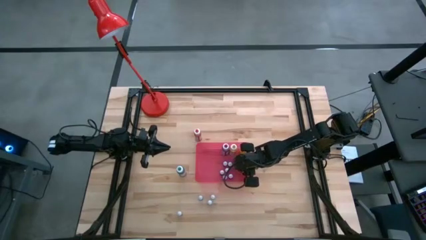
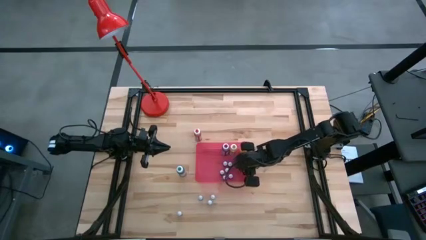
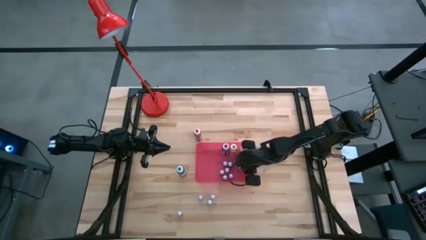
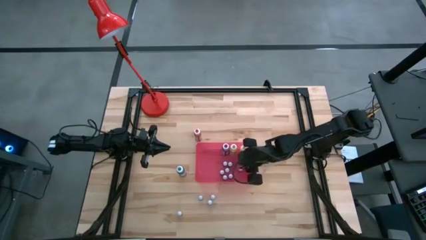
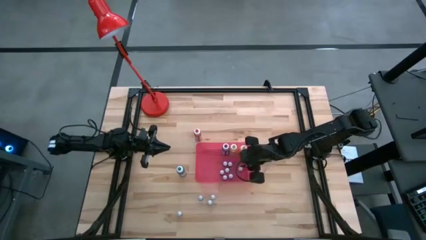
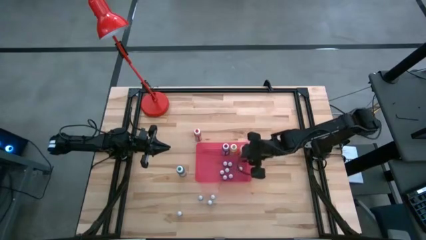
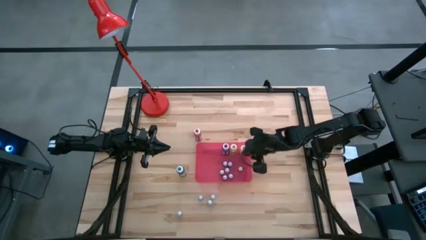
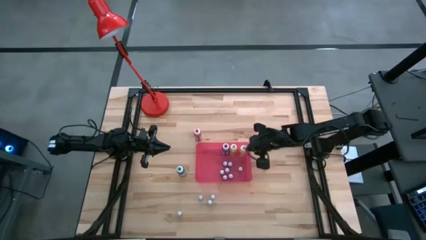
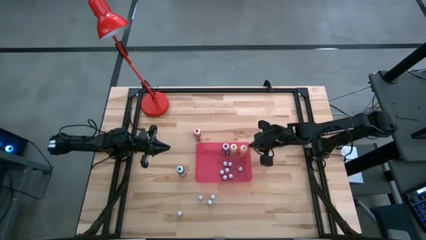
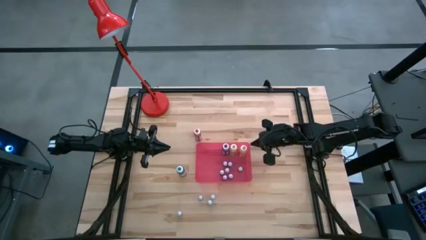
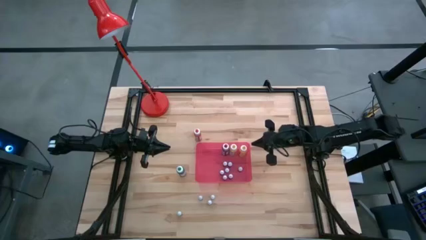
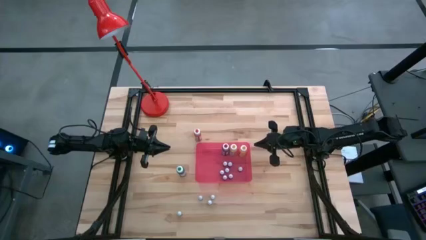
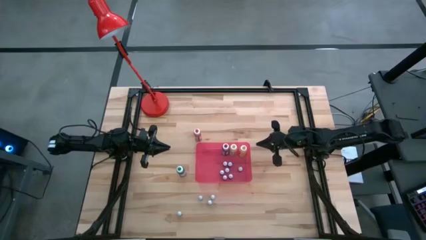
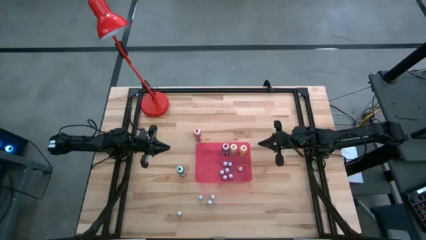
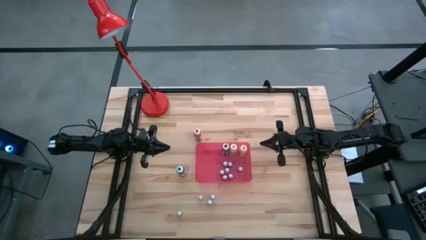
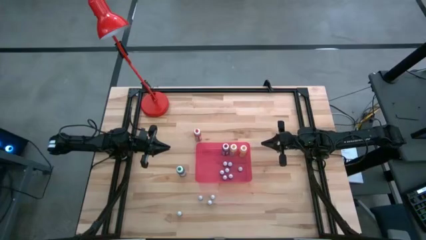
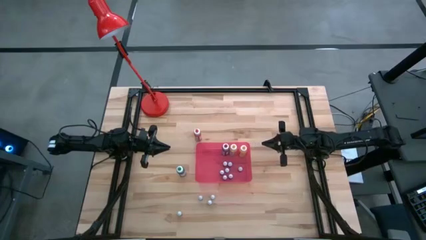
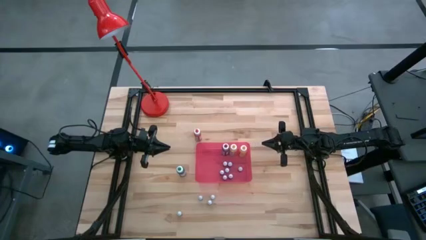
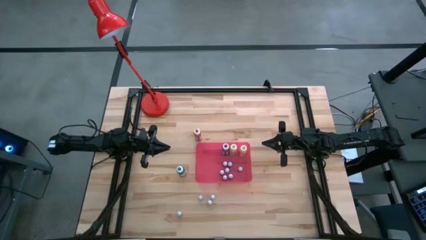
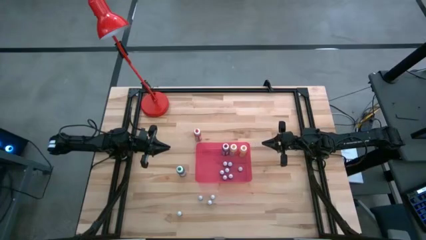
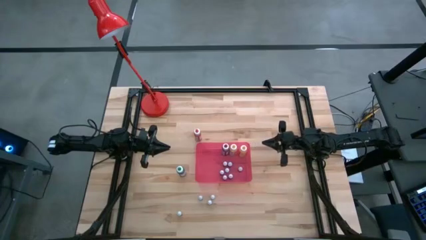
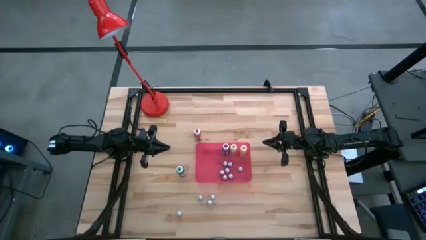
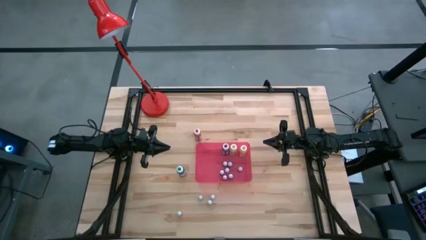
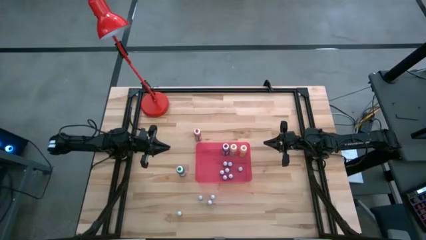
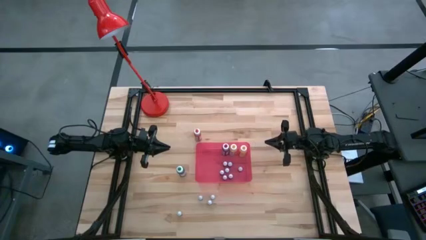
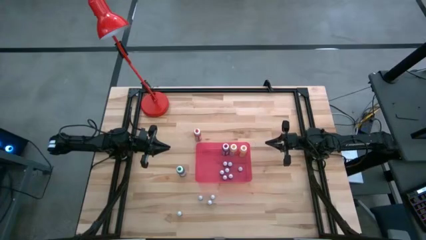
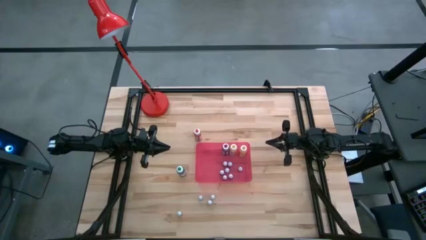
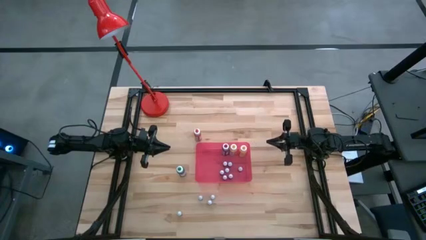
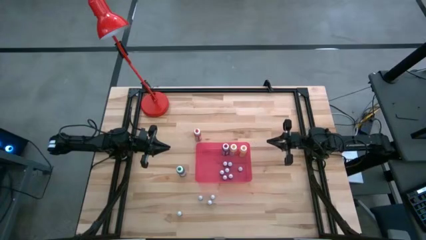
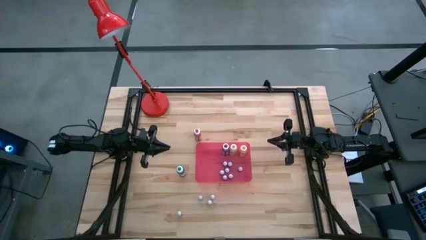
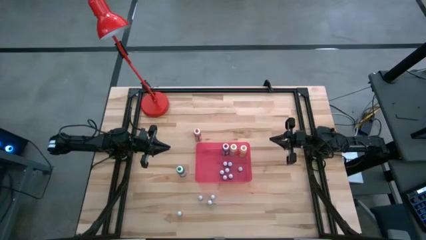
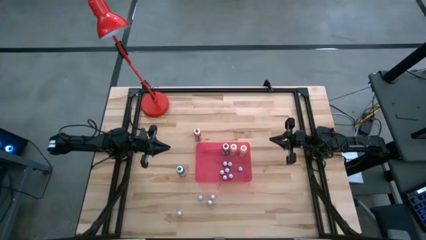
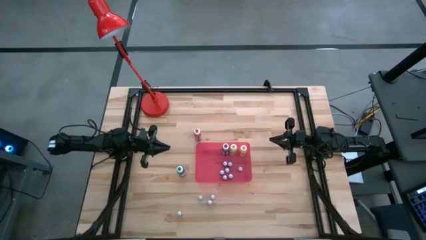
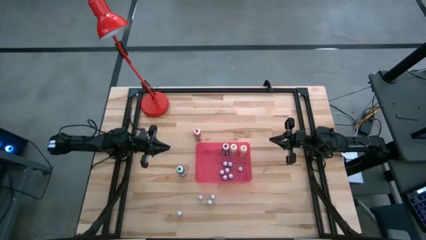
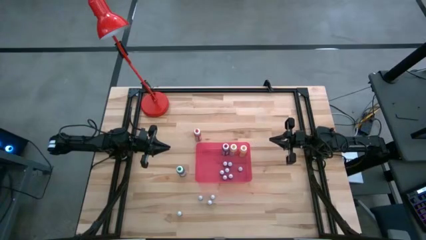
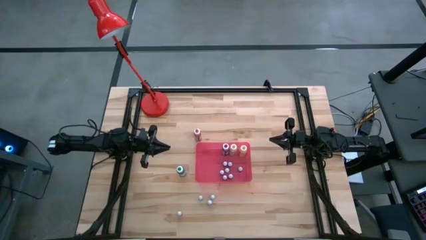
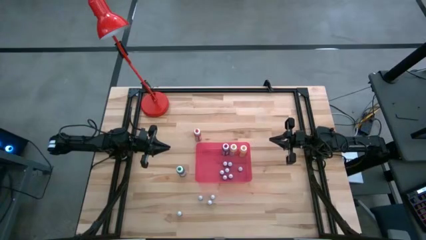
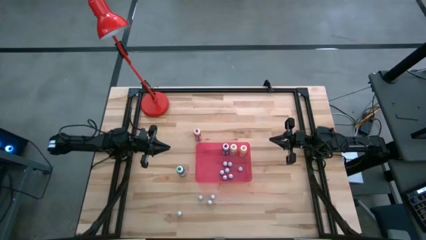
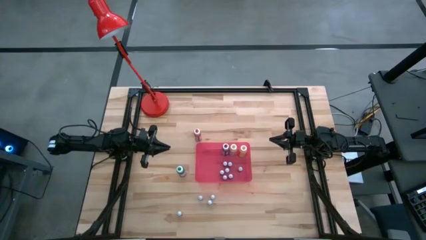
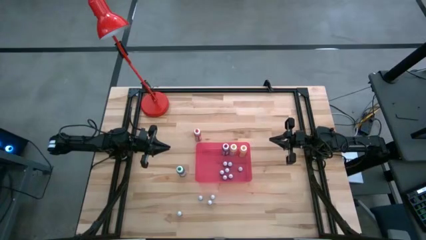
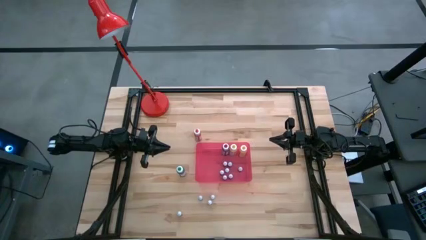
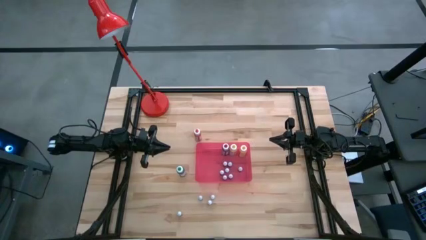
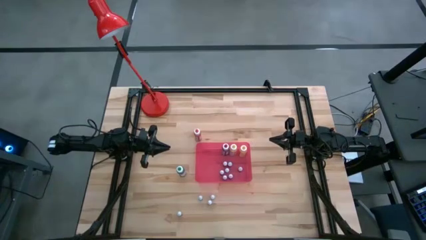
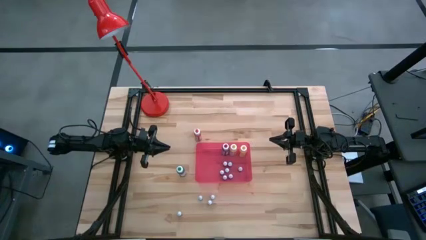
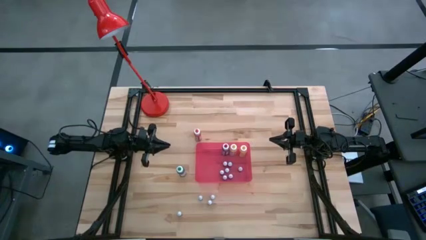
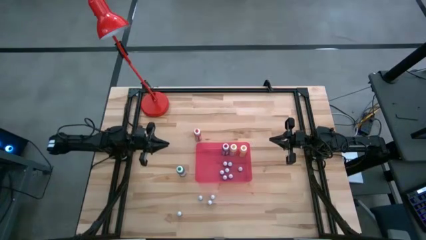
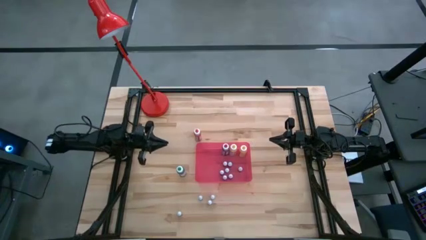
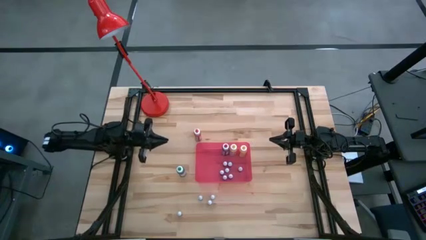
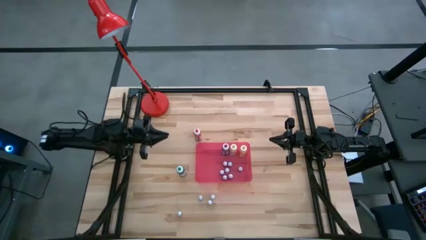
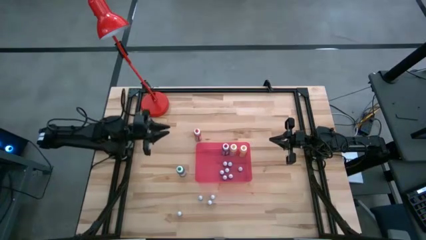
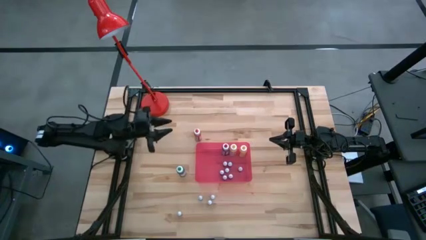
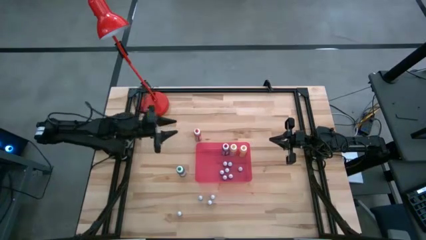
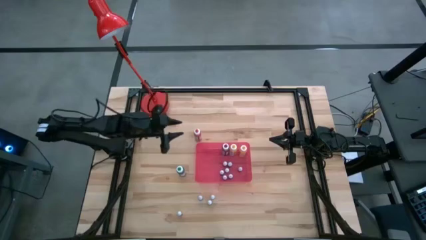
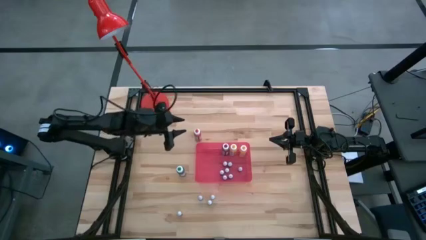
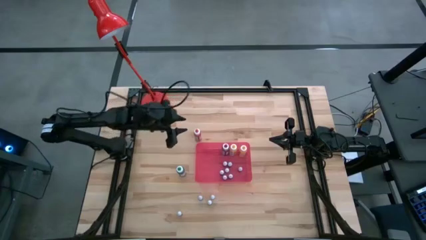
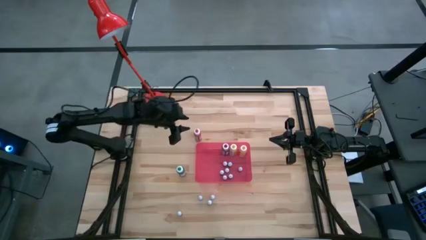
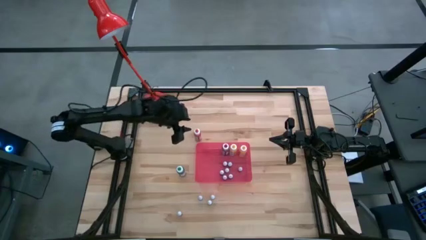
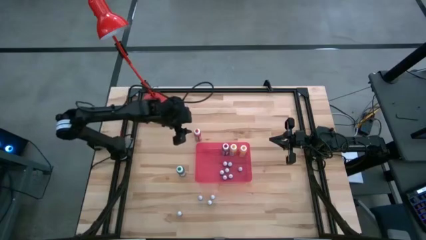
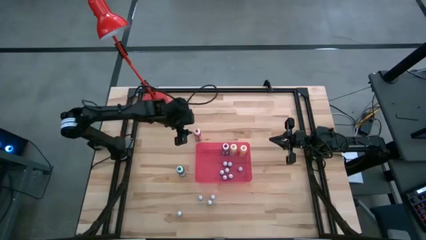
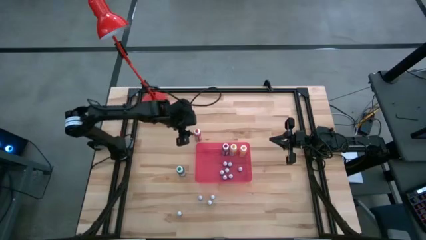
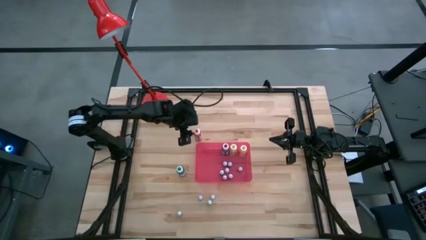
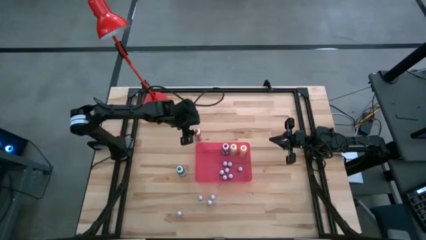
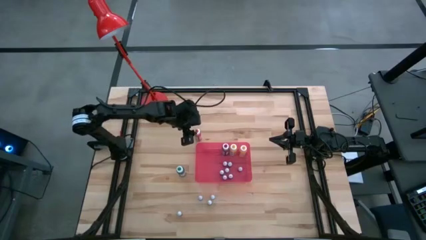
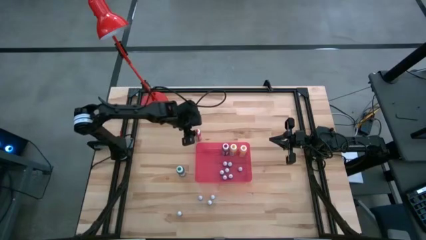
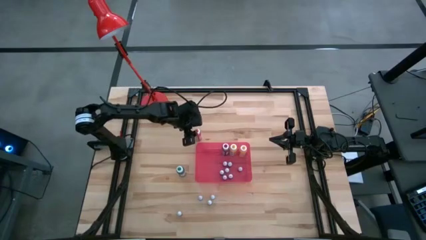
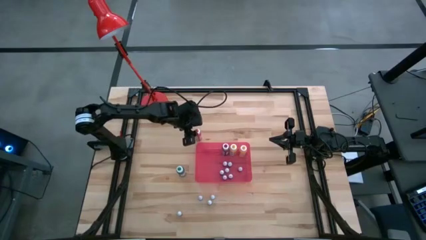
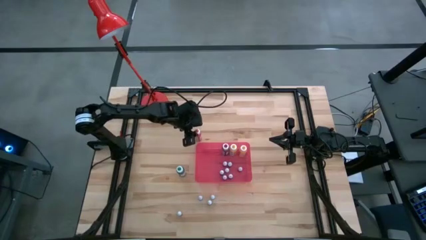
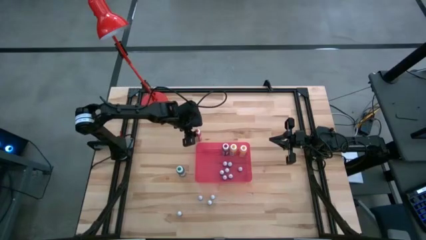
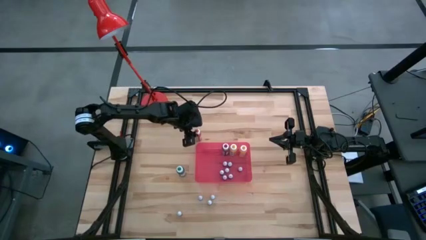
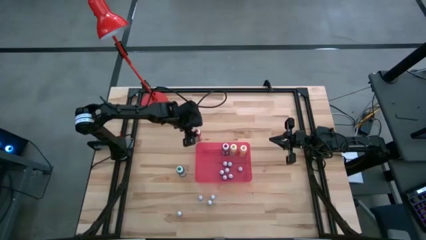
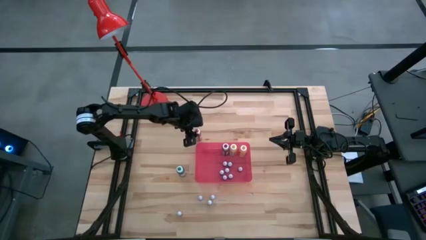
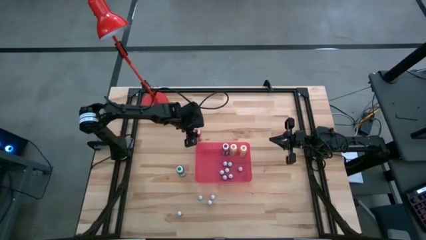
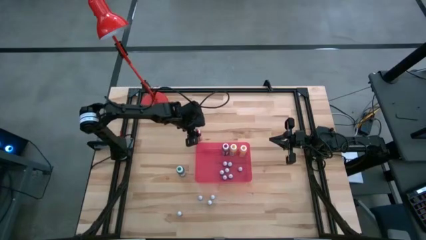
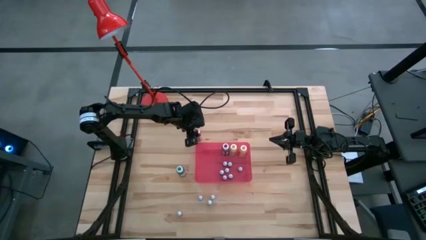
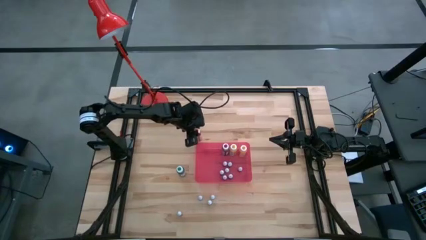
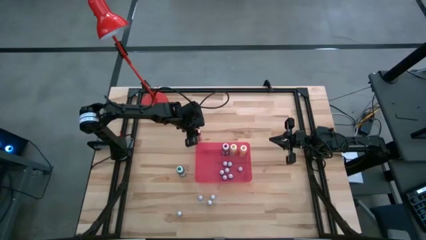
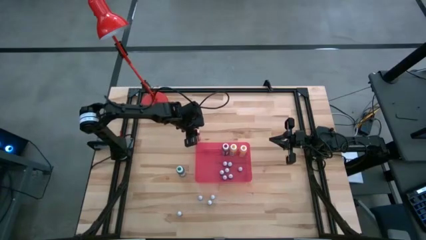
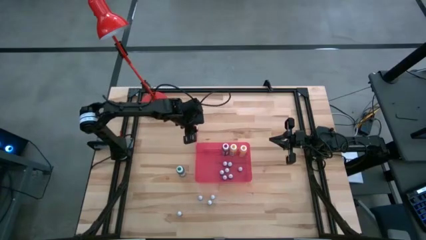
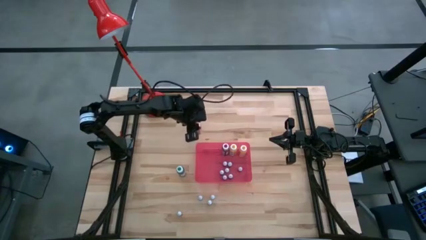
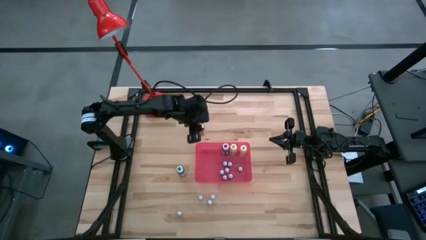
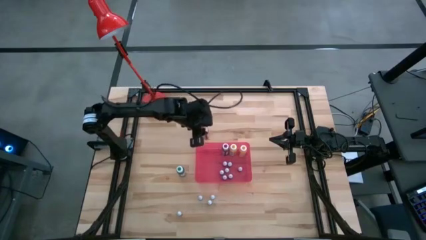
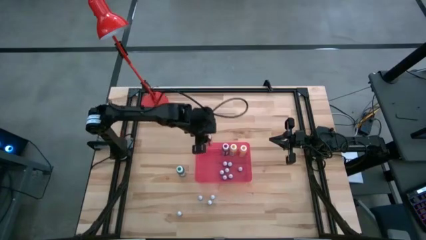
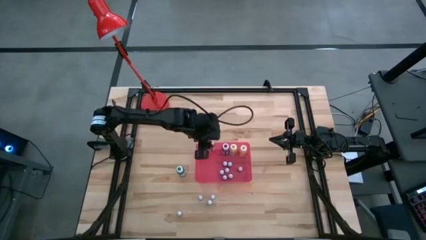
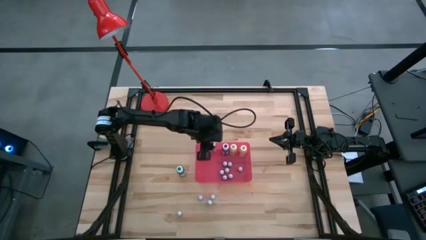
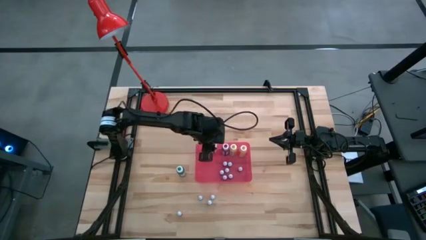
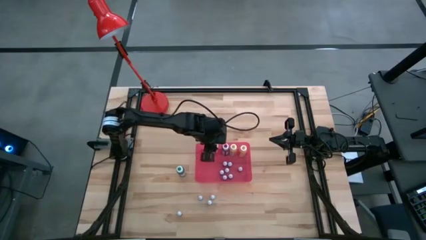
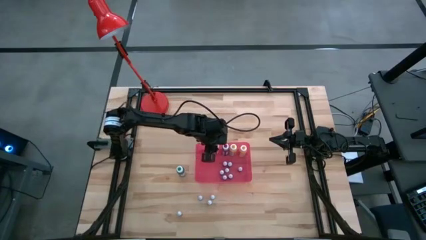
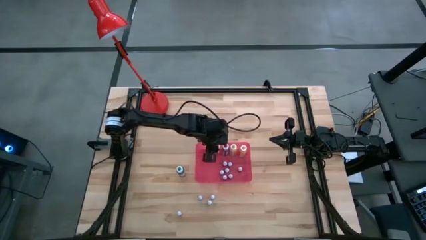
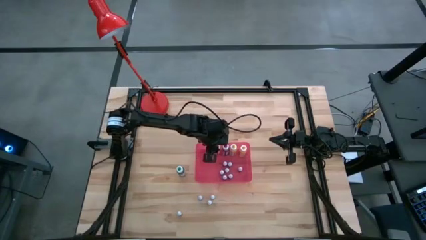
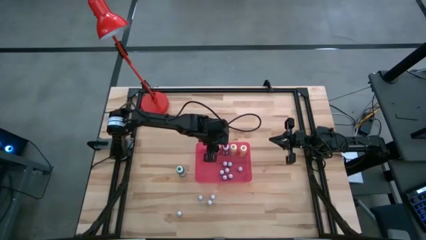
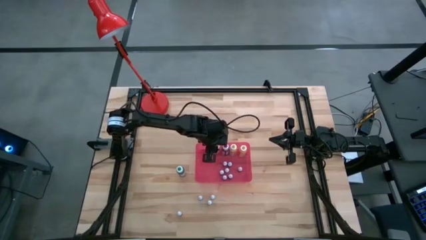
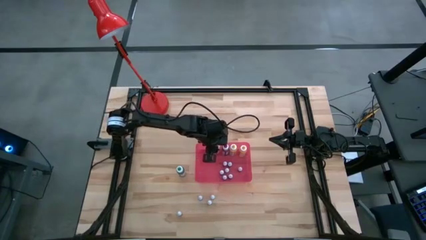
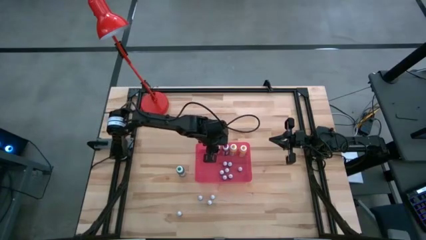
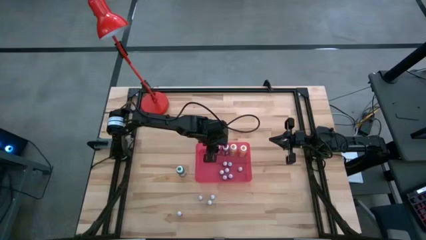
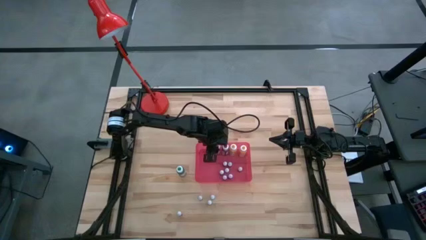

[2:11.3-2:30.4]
Task: Pick & Place food coloring
Put the large orange food coloring bottle into the container
